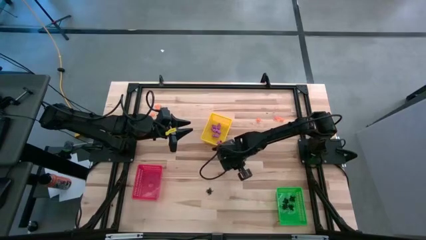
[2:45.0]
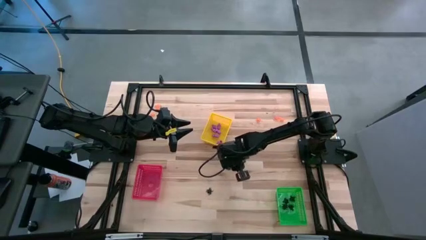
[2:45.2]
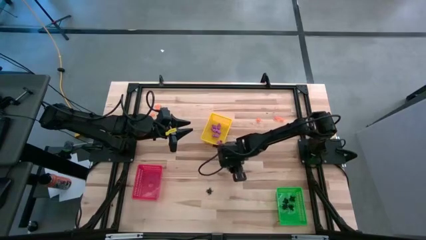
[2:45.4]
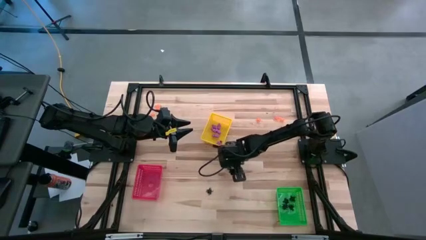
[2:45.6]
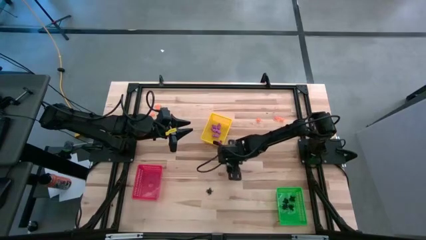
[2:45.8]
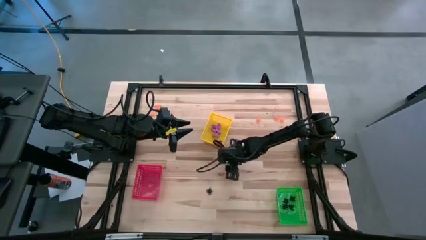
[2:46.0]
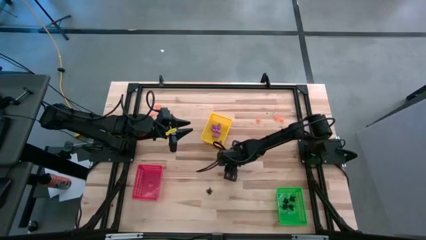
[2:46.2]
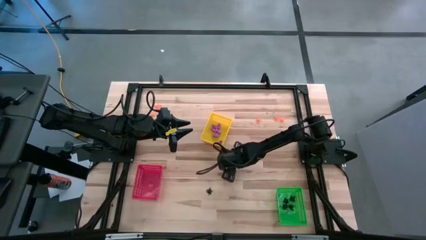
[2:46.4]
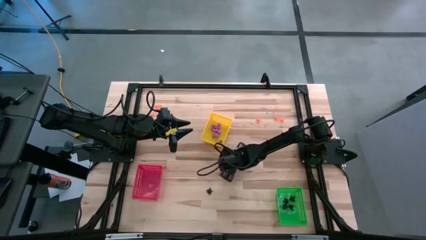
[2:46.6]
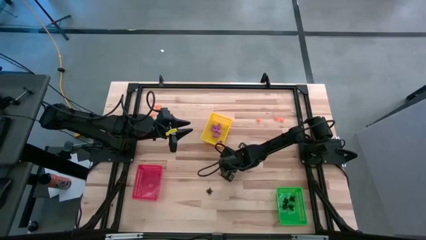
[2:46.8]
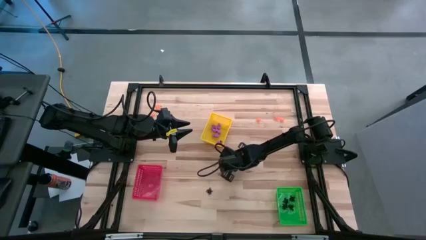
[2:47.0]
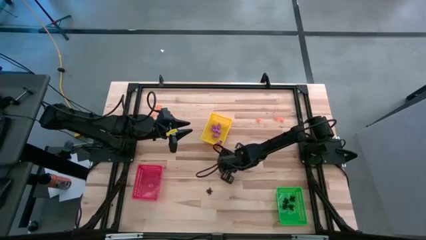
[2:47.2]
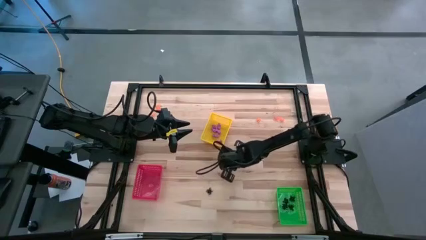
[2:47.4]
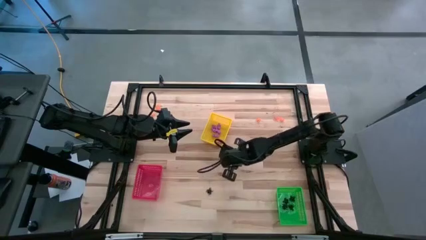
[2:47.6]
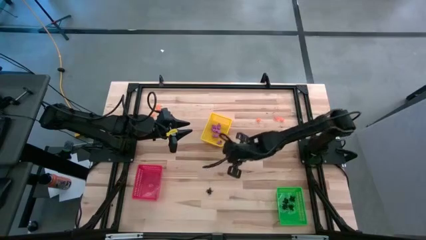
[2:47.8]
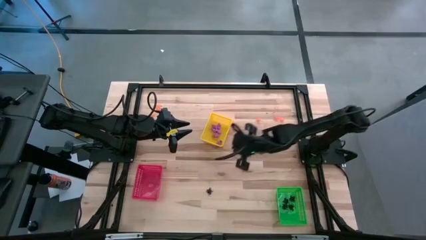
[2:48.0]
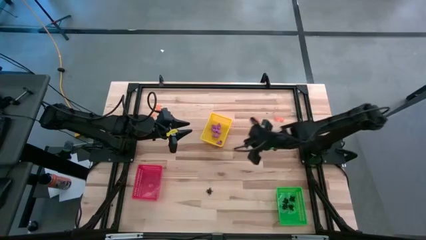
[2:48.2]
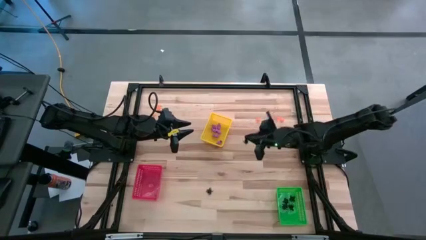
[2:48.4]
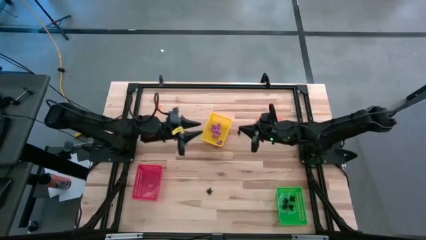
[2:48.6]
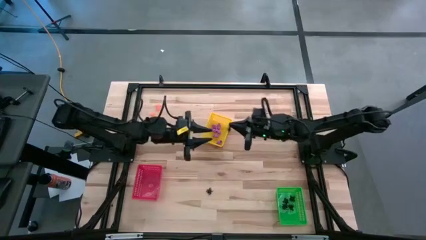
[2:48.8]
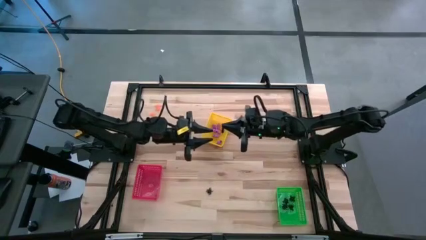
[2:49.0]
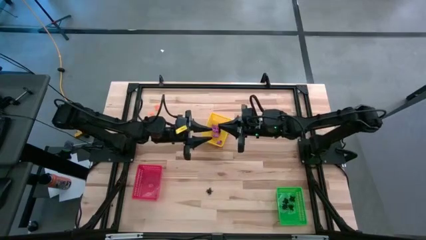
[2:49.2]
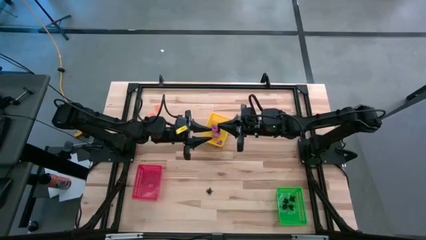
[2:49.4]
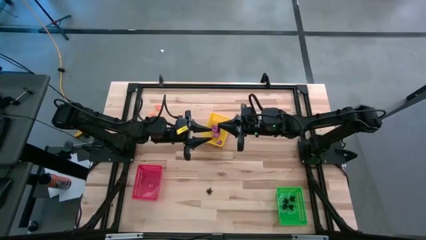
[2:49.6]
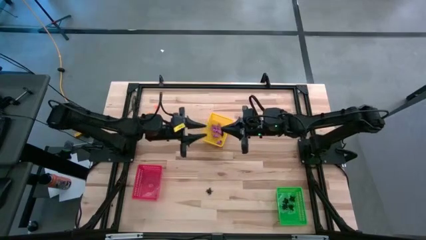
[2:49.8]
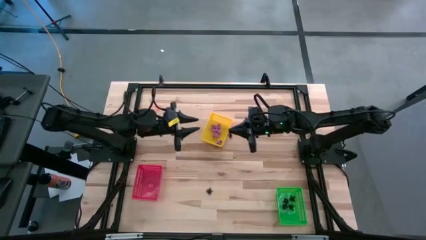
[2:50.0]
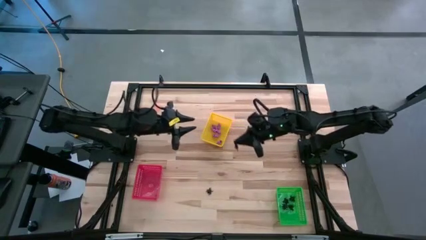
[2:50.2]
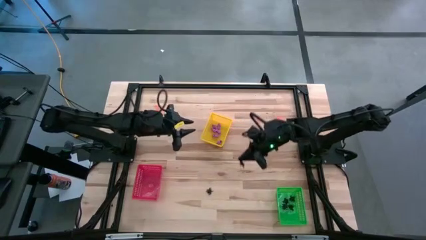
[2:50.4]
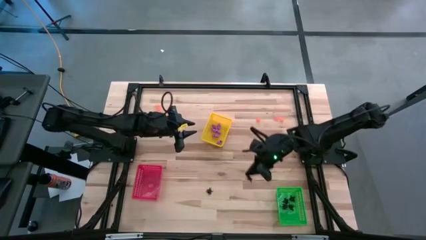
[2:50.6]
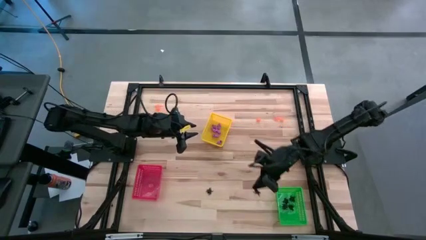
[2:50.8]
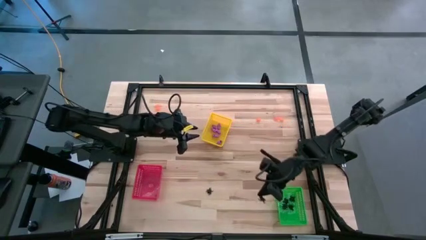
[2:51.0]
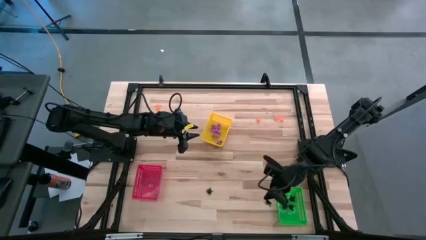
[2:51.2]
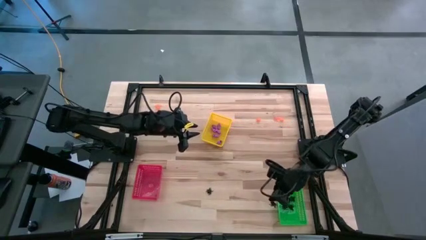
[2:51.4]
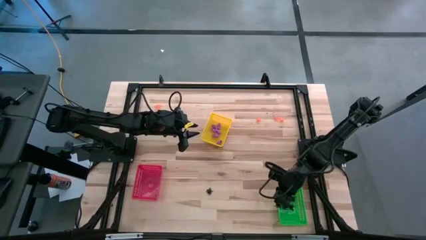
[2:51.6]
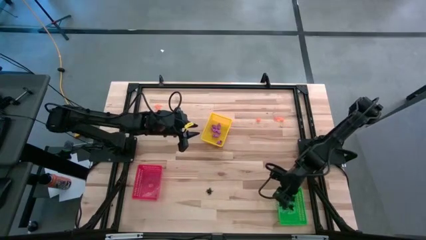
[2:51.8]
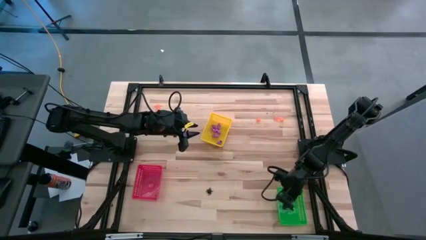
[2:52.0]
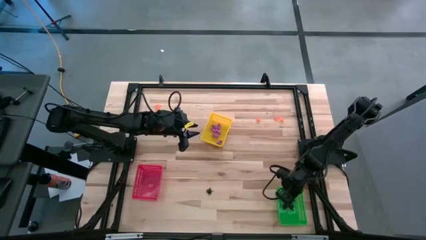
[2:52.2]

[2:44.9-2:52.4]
Task: Sort Halloween decoration
Put the right black spider toy into the green bin

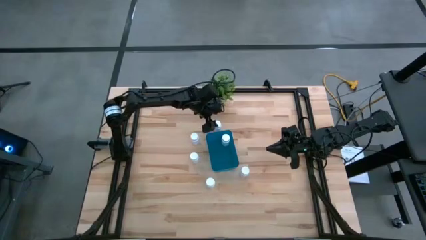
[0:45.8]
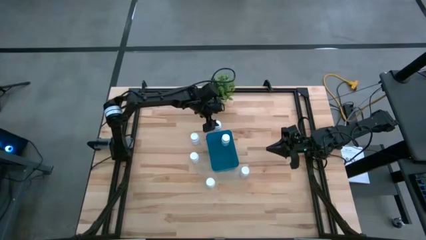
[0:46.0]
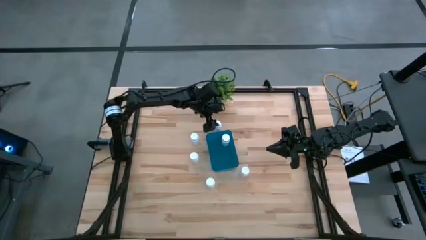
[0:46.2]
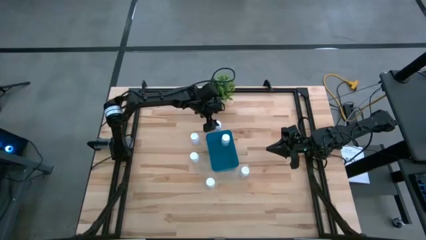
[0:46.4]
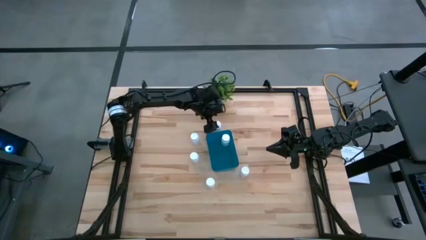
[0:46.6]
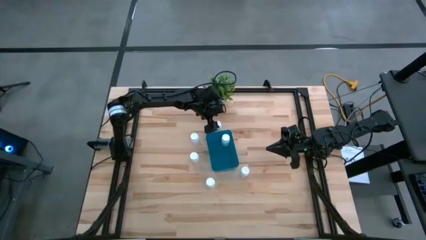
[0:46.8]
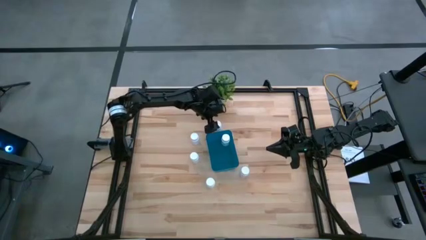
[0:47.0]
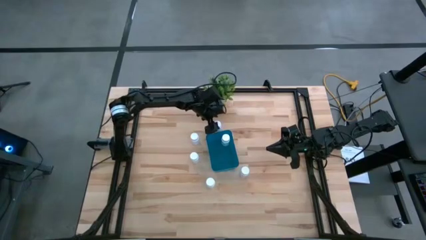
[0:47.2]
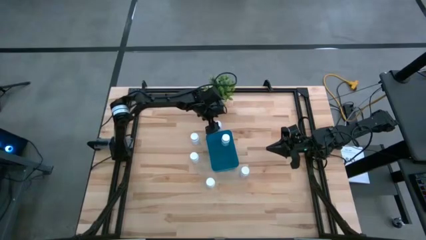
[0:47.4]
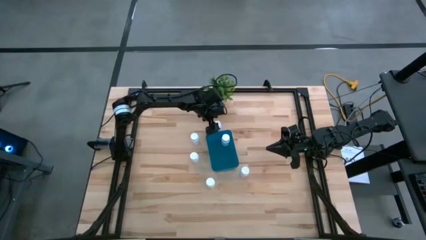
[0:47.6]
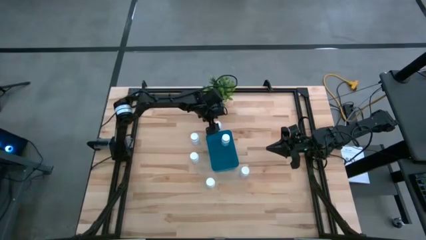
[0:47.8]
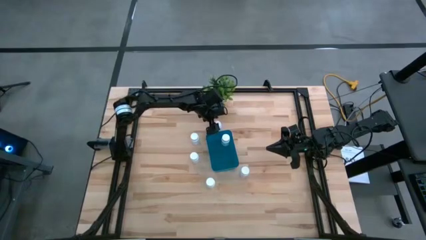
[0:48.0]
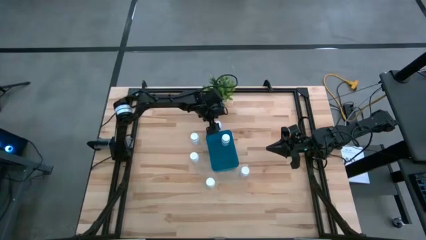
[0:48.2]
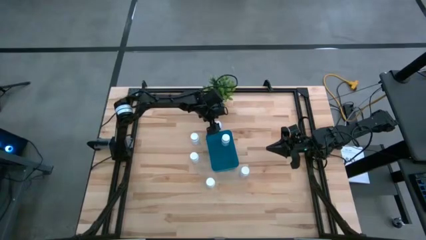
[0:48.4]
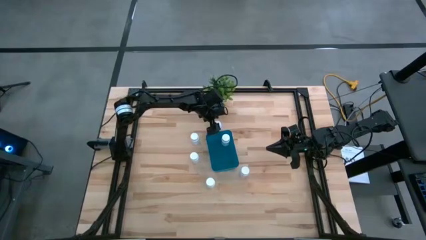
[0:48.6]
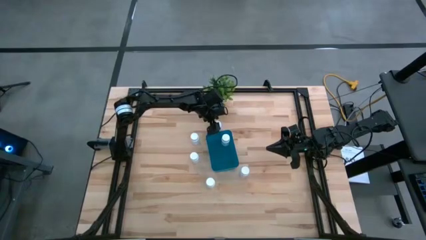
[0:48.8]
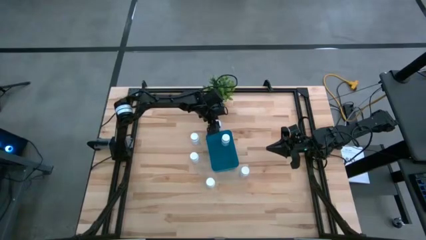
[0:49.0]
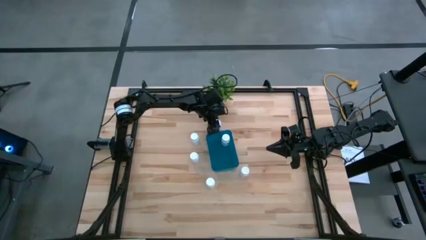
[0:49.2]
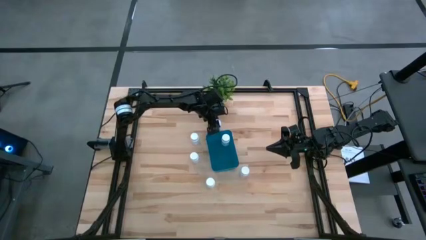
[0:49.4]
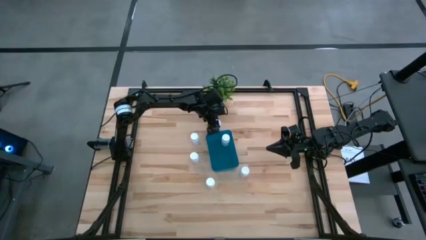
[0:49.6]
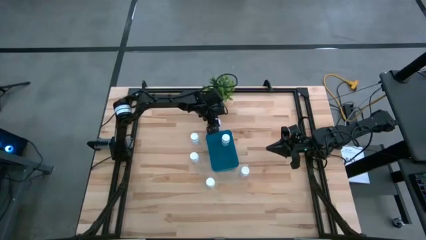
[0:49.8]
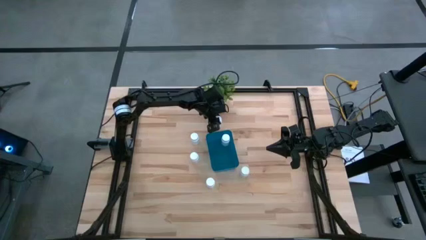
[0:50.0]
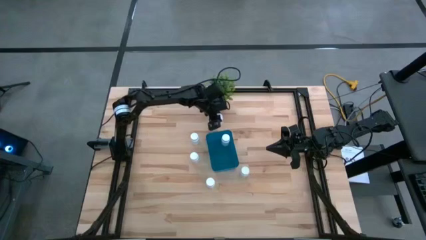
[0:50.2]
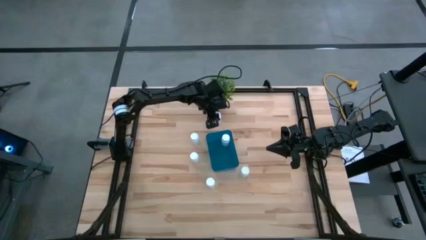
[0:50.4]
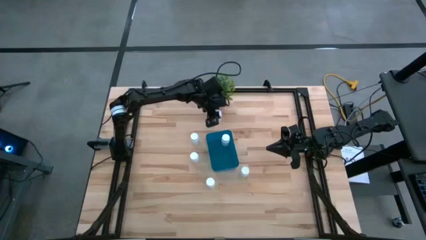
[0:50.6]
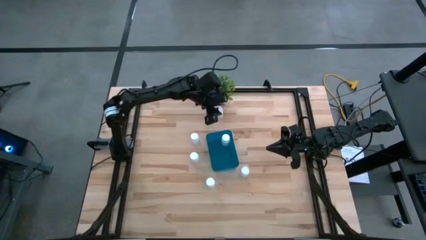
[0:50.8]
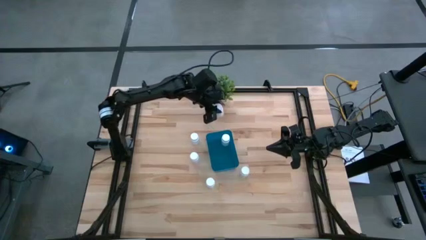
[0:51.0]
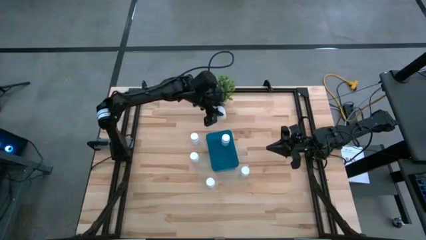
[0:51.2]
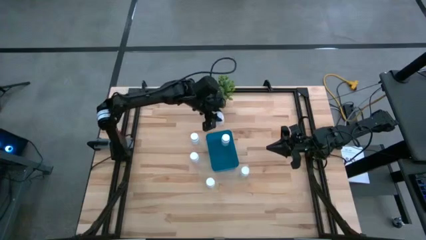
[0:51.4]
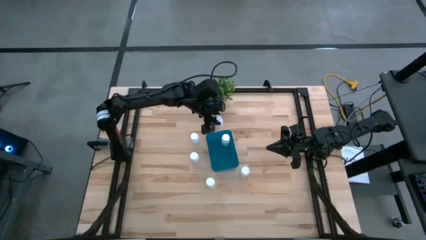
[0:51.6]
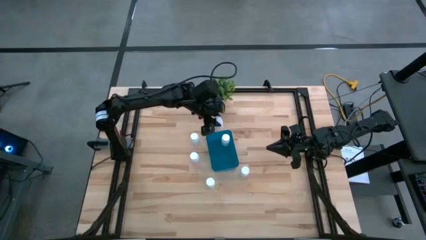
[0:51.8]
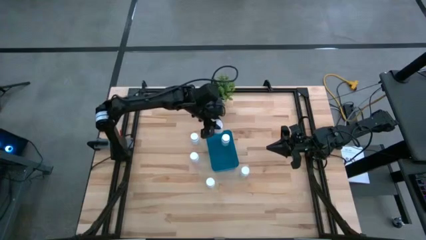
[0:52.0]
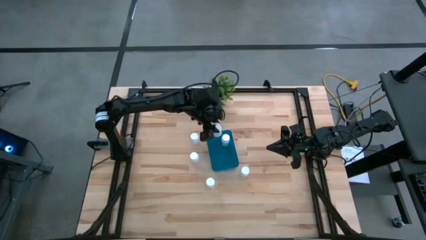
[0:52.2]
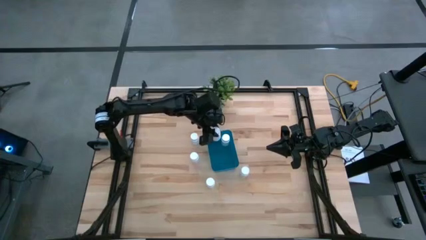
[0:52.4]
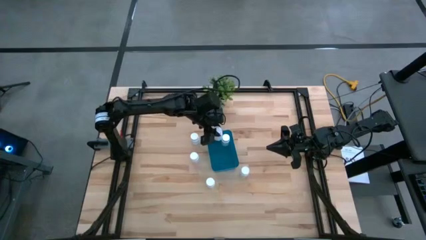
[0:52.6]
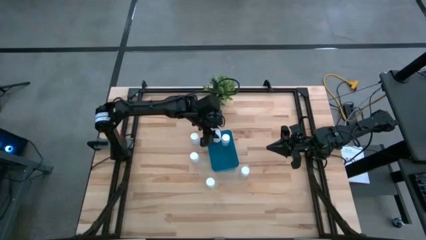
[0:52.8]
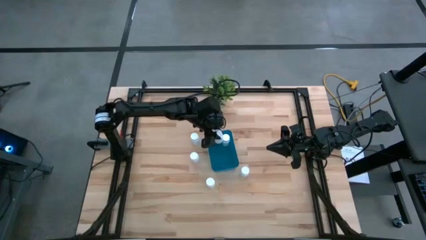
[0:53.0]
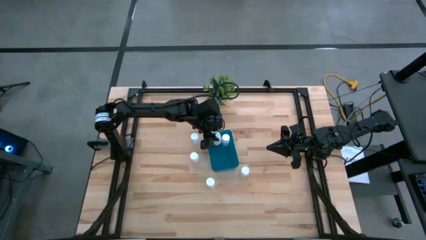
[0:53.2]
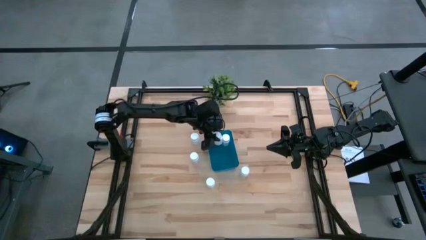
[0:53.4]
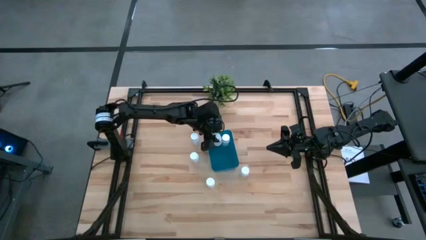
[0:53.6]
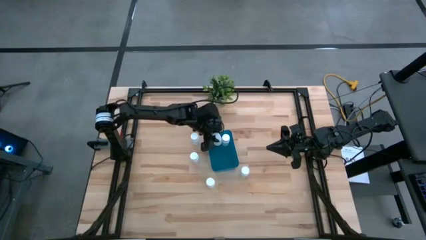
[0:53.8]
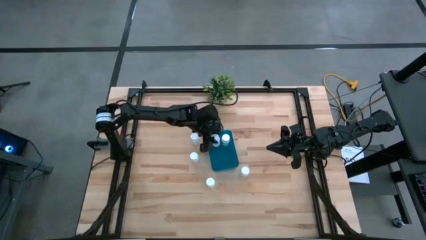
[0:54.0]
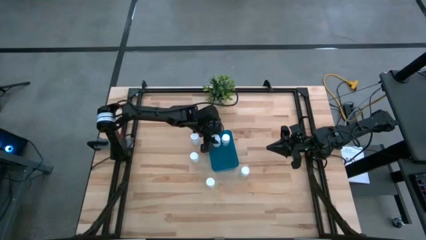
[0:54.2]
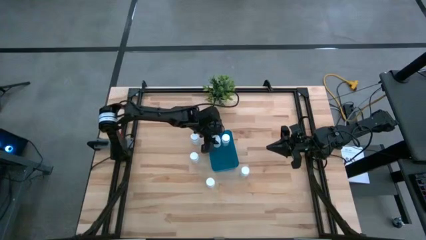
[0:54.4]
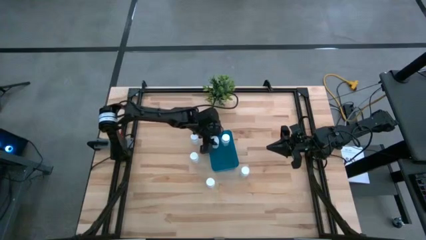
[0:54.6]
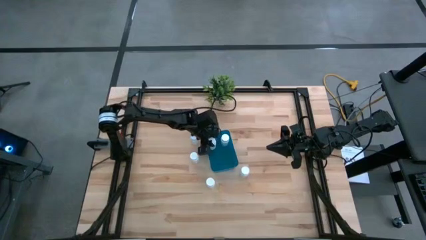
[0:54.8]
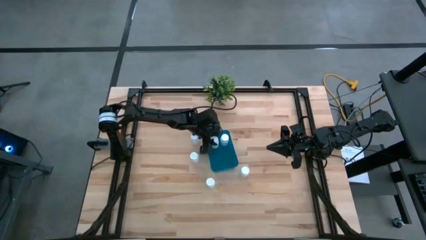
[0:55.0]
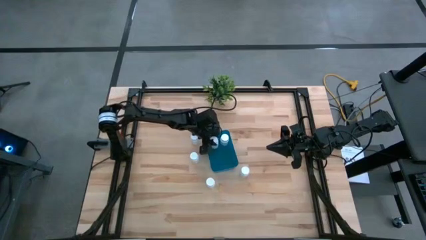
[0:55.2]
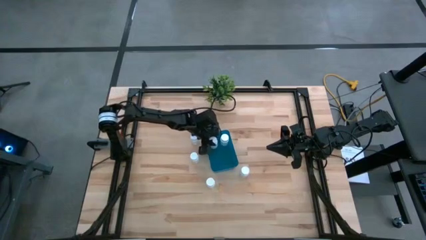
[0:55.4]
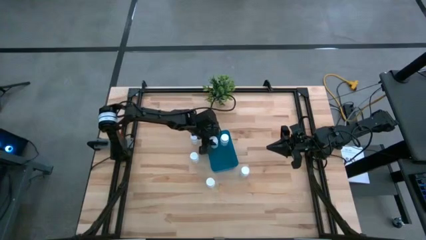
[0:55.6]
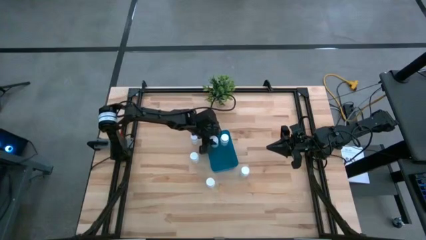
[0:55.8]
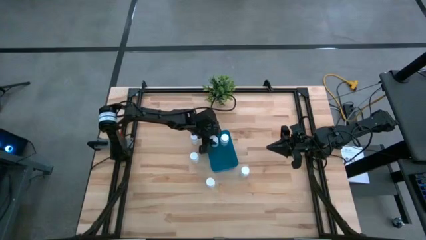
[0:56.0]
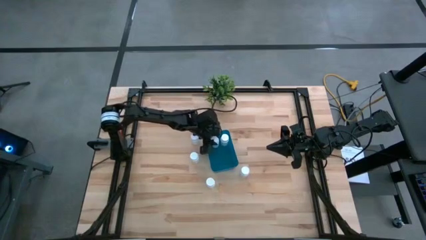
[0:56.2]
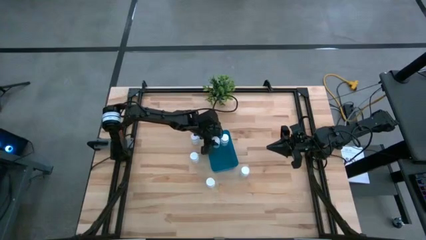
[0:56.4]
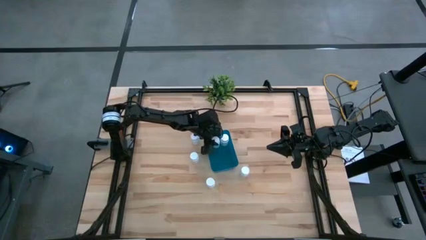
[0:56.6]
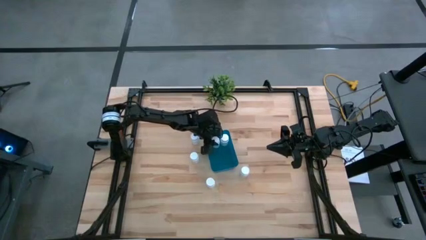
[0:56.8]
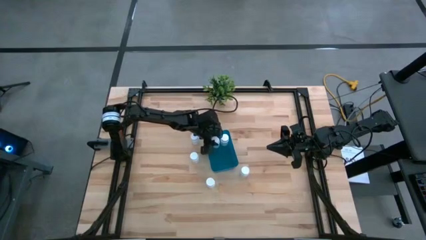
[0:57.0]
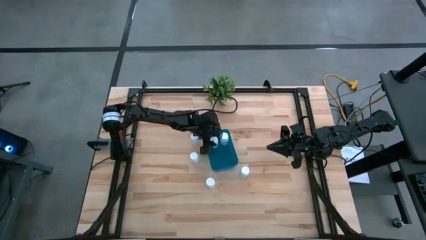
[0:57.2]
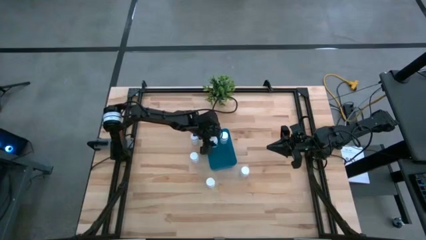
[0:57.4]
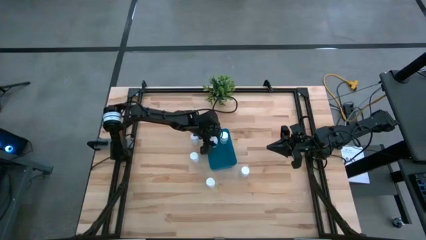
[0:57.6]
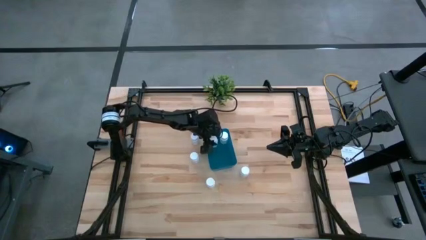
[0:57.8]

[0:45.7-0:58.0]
Task: Pick and place pill bottles into a basket
Put the white medicine bottle into the blue bin
